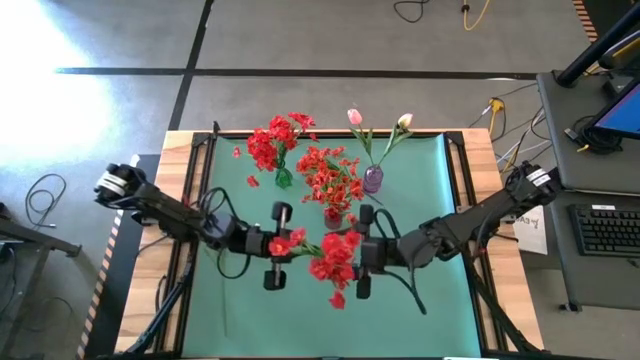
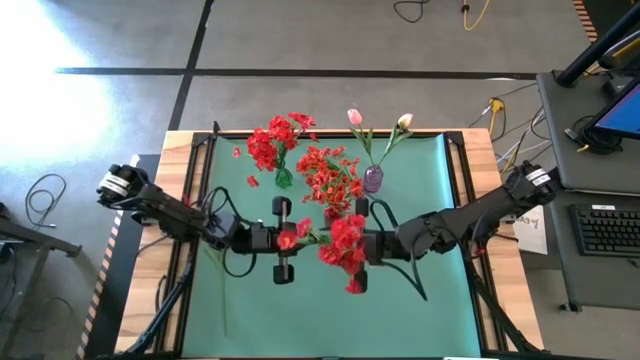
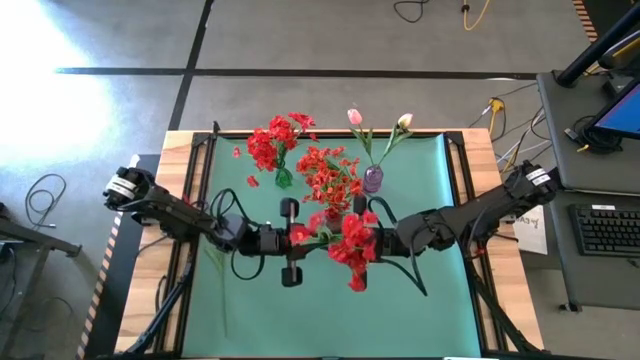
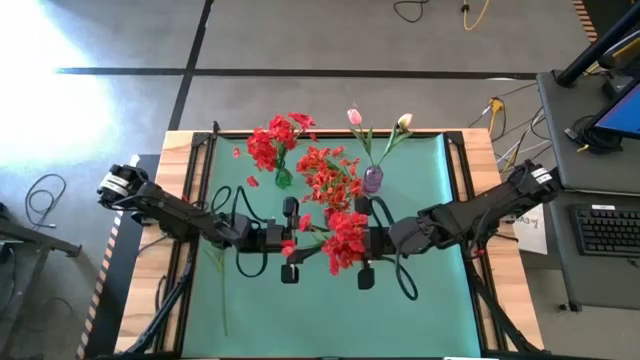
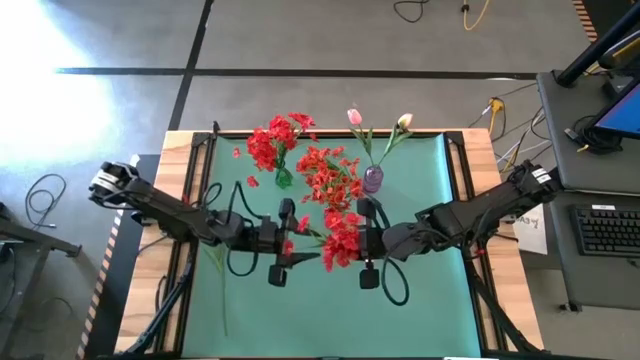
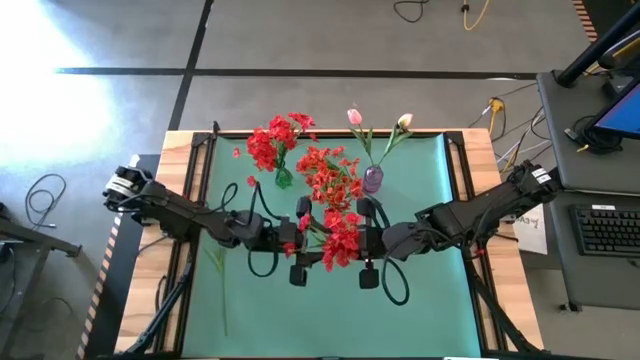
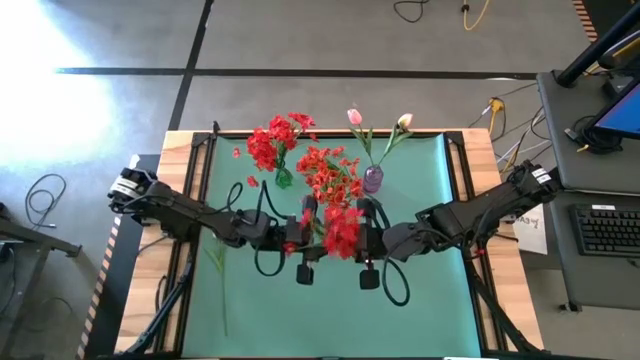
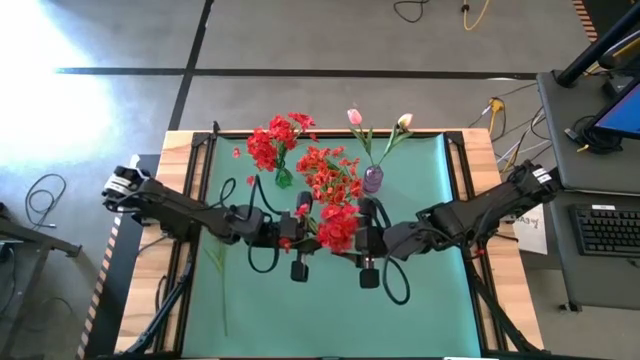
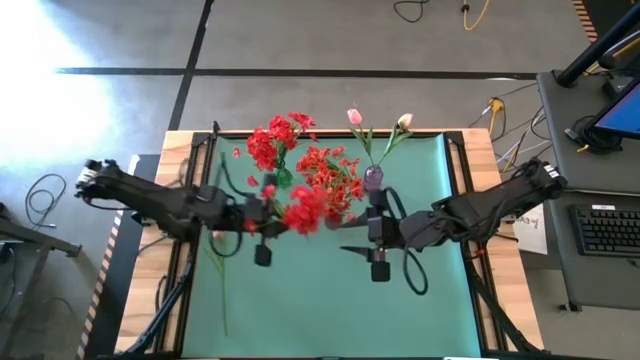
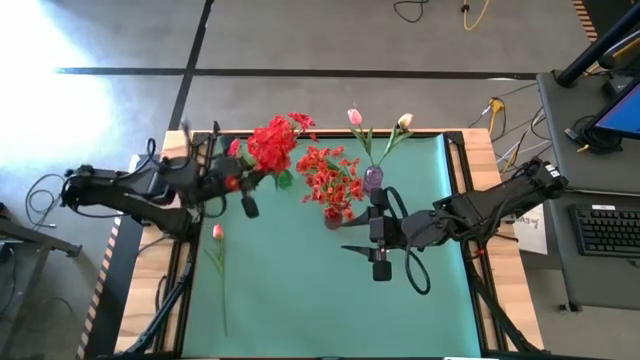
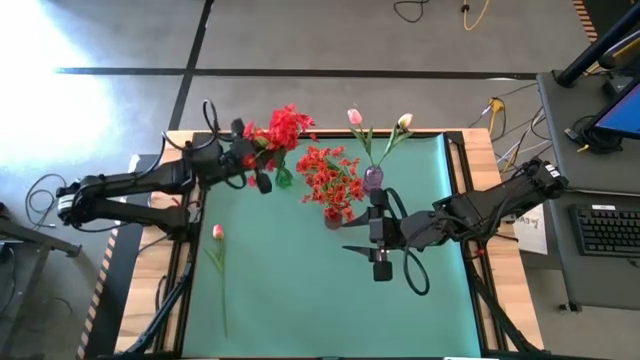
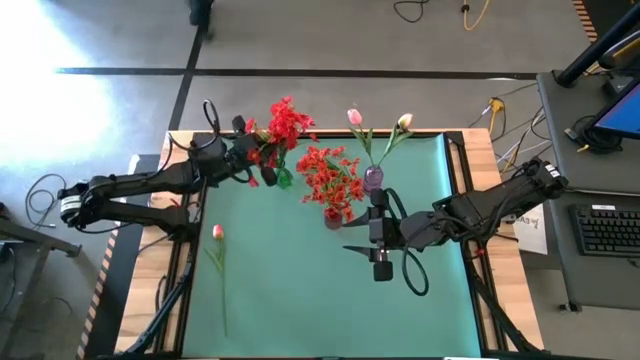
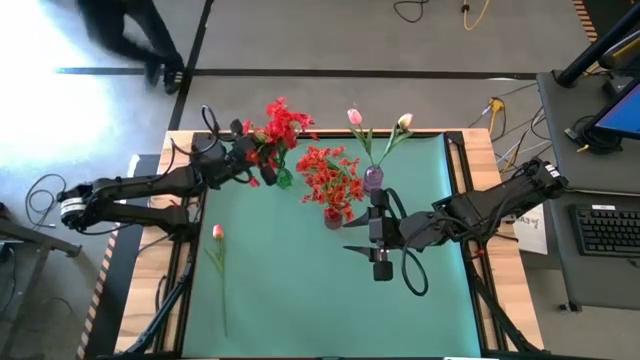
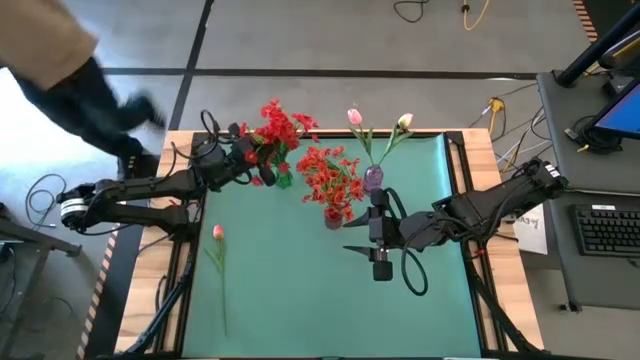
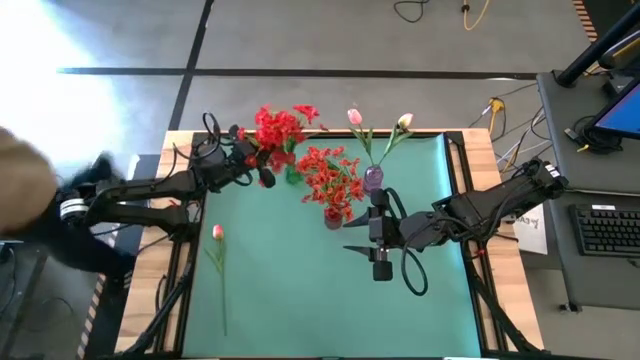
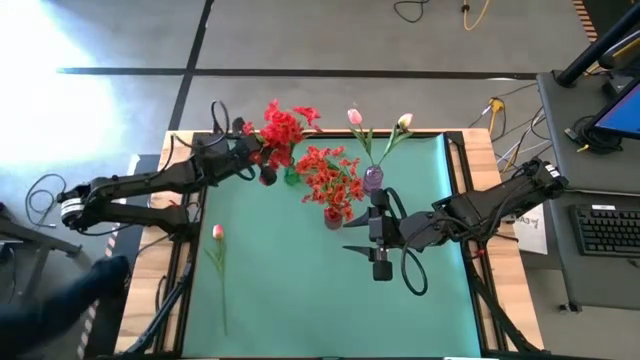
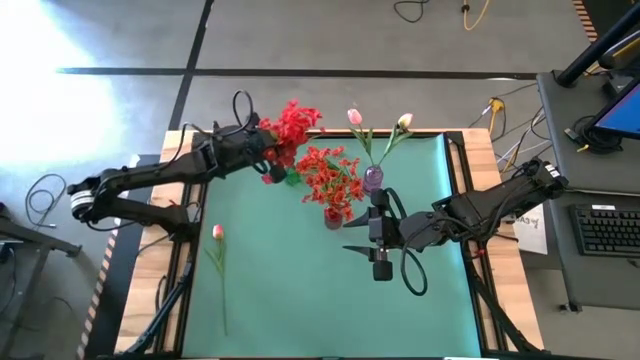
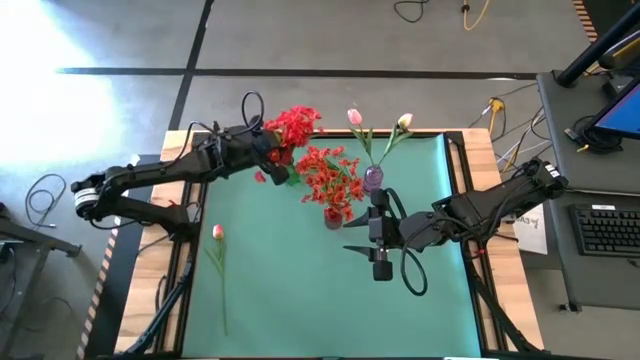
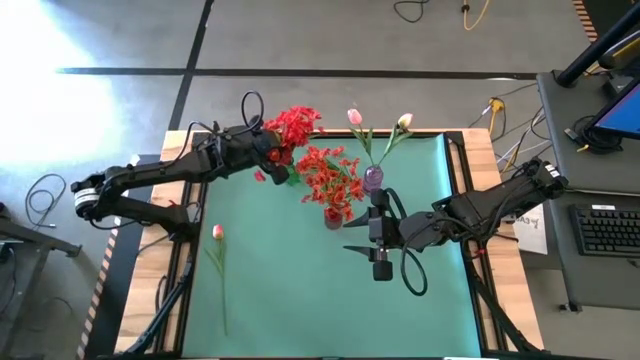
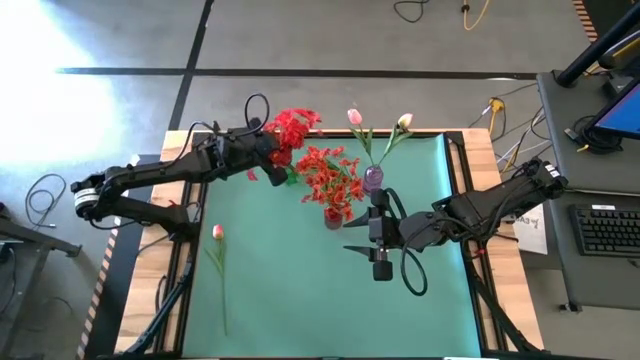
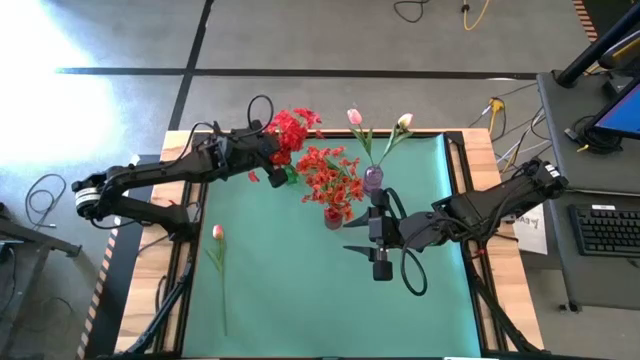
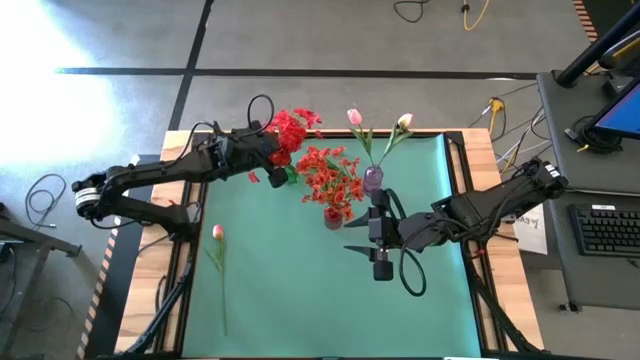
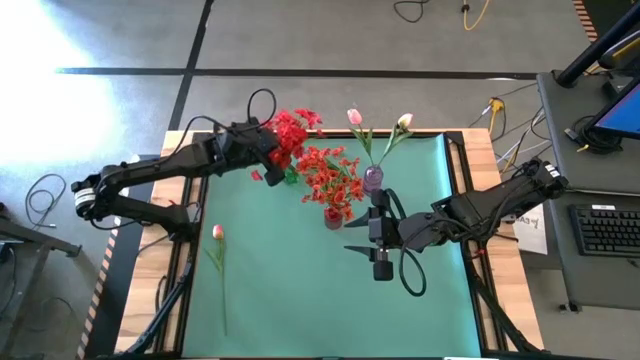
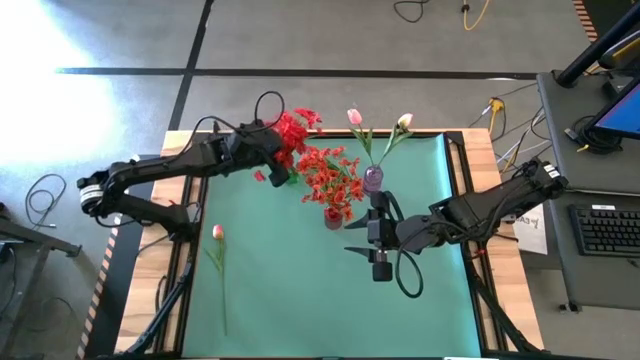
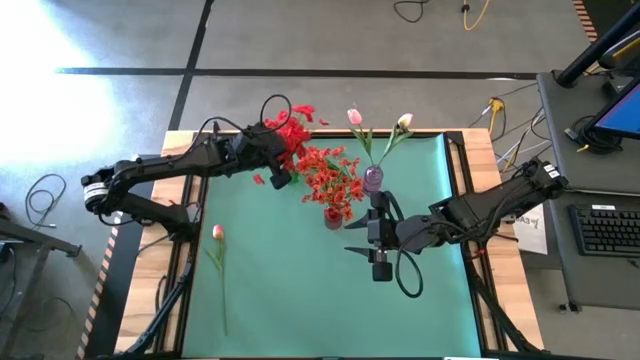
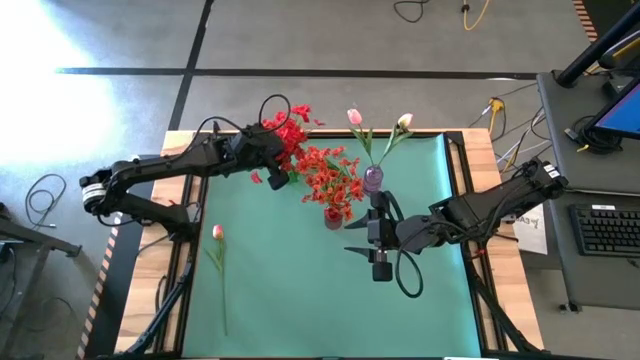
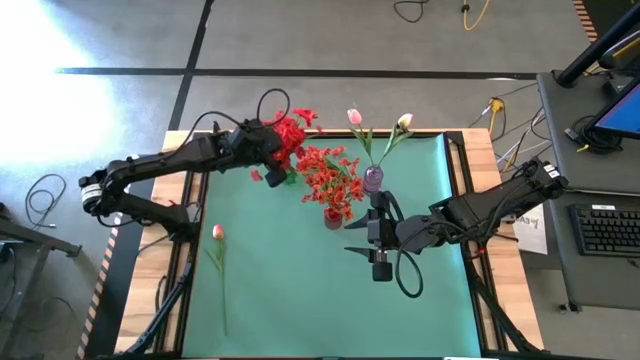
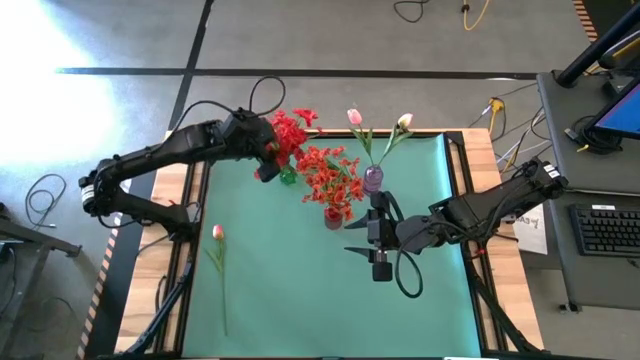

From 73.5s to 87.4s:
Task: Sort flowers into vase by color
Put the red flowers into the green vase

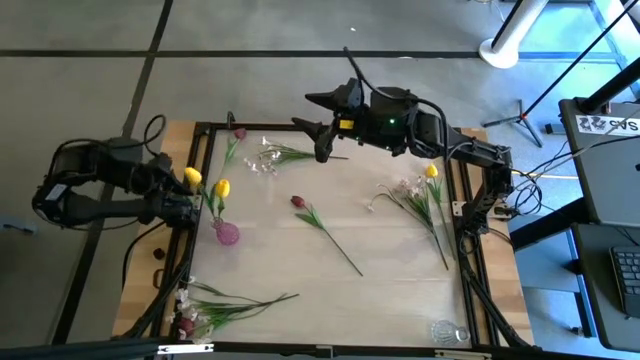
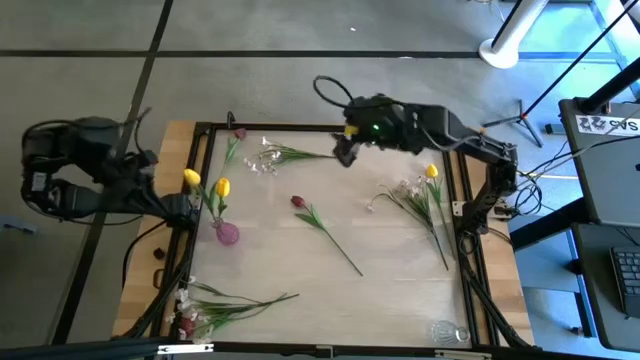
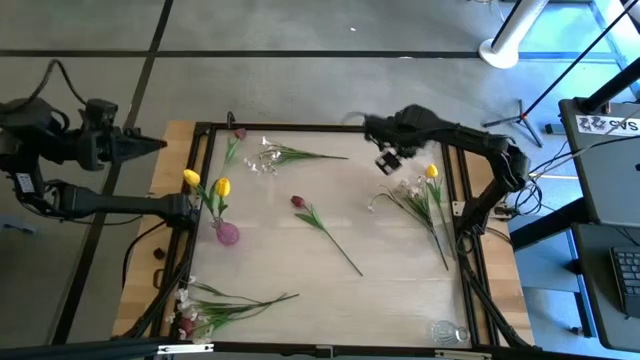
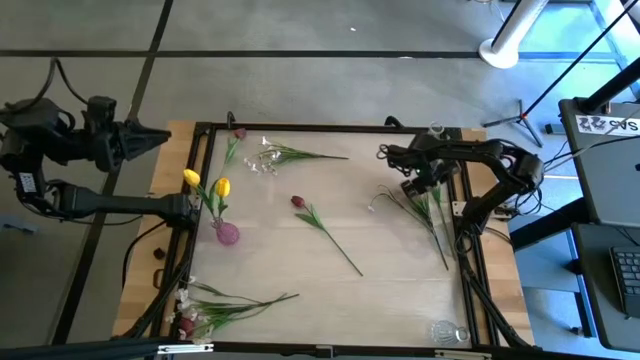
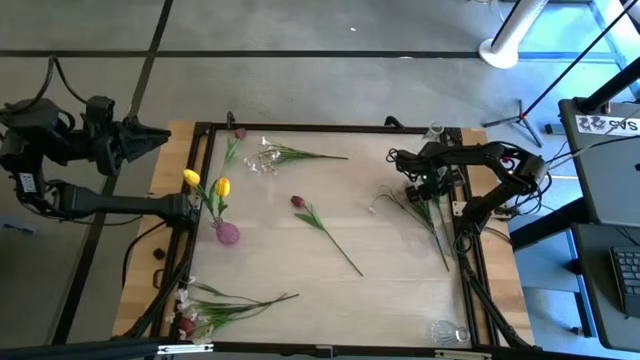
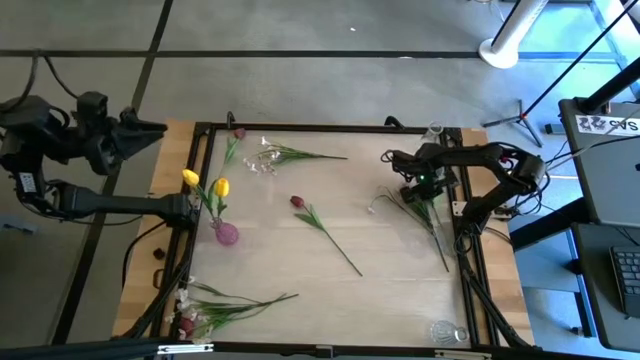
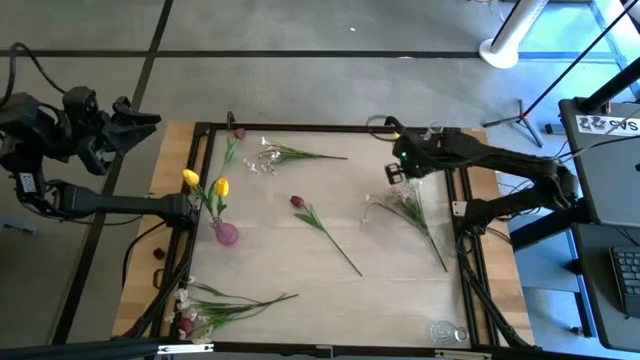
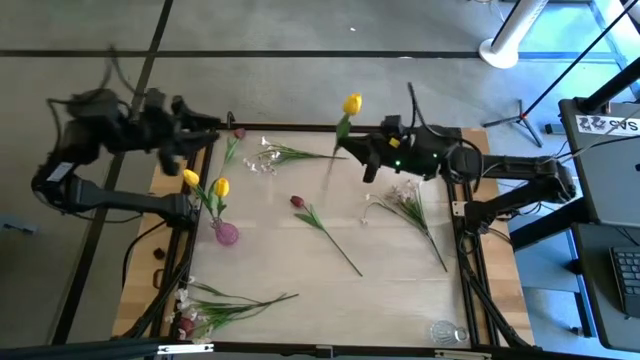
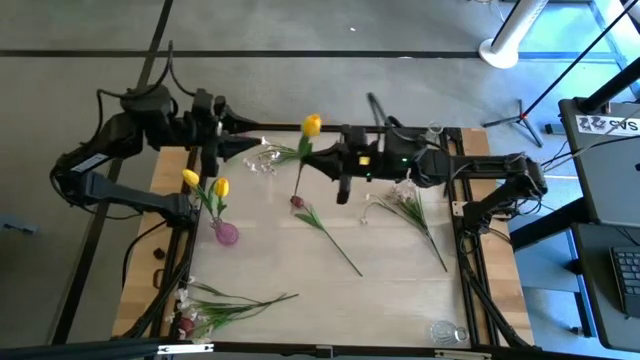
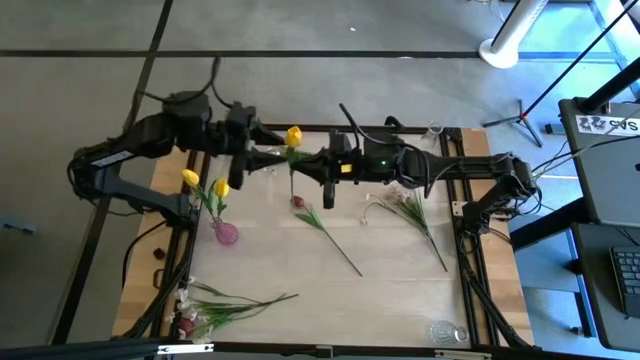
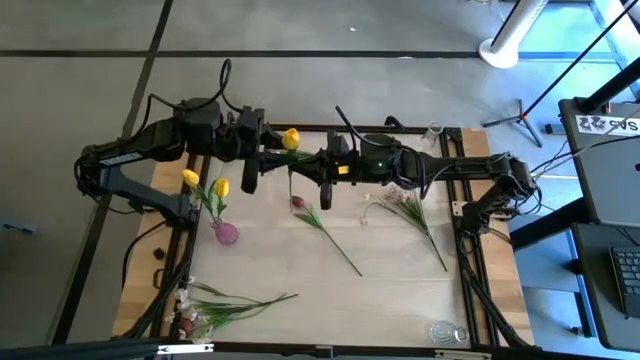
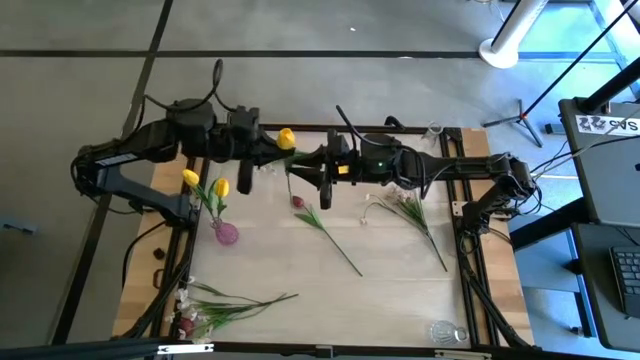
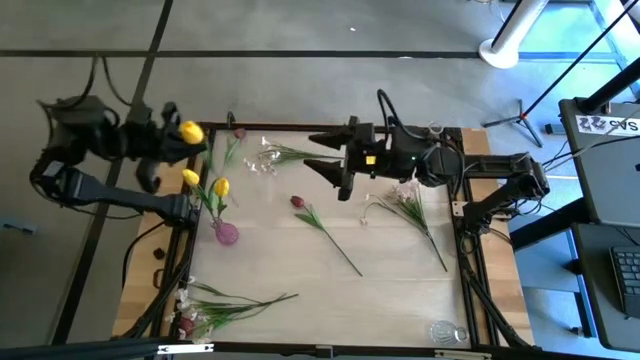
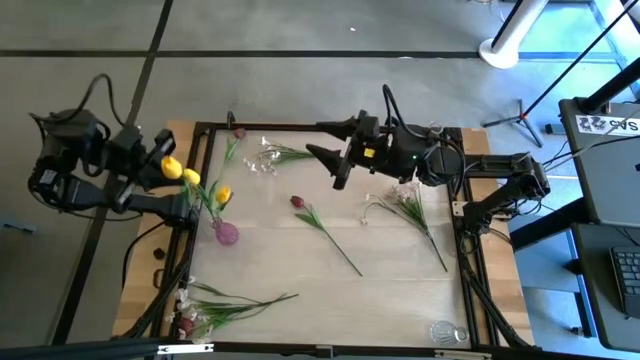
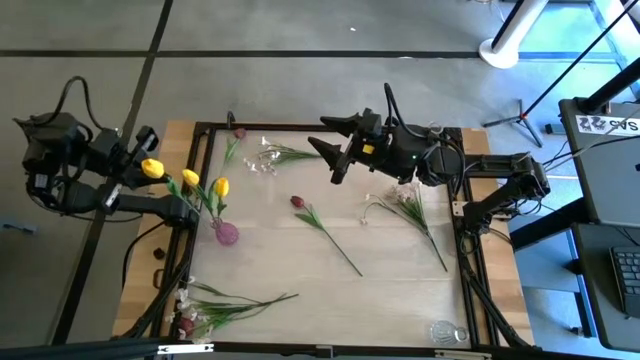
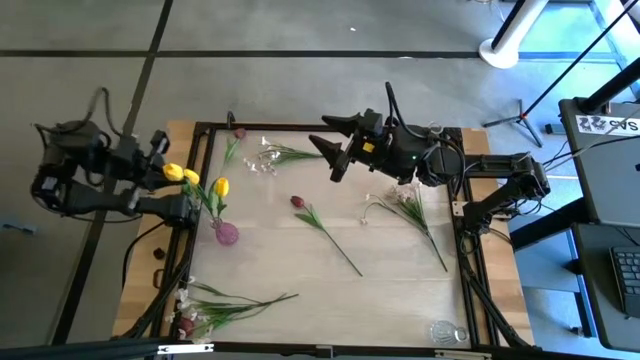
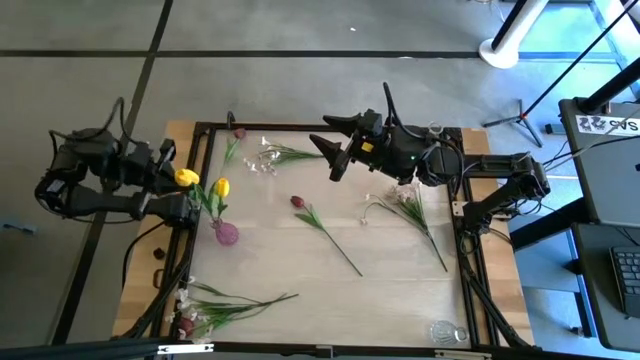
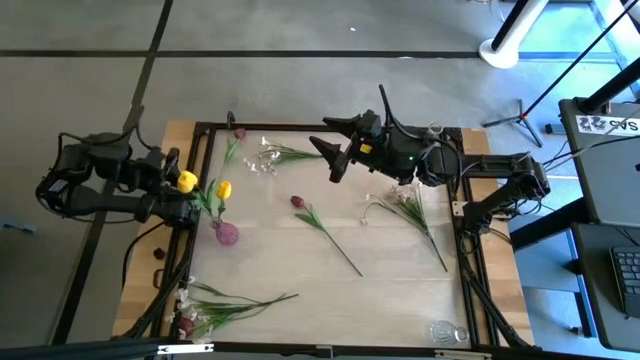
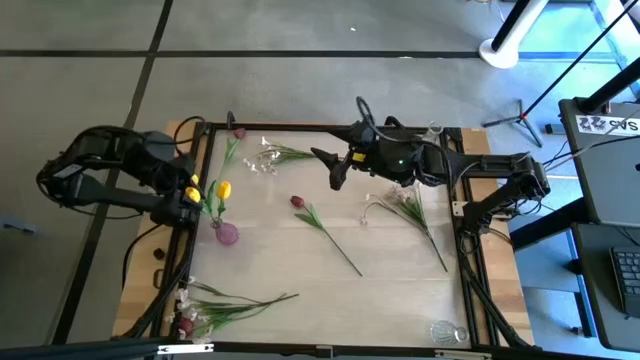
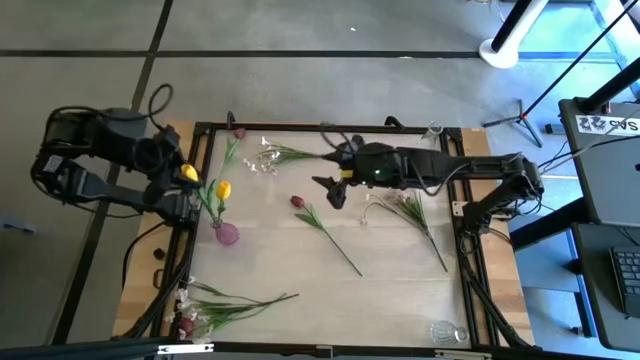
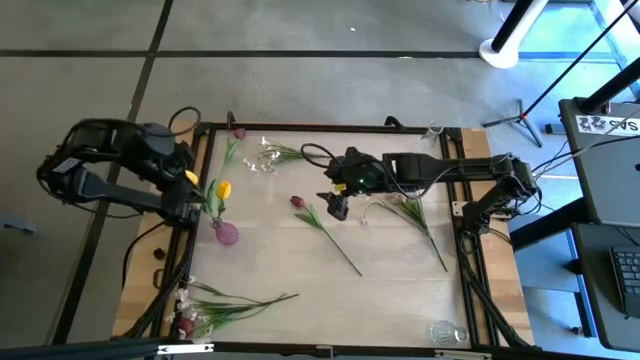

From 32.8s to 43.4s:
Task: Sort flowers into vase by color
Put the yellow tulip into the purple flower vase
